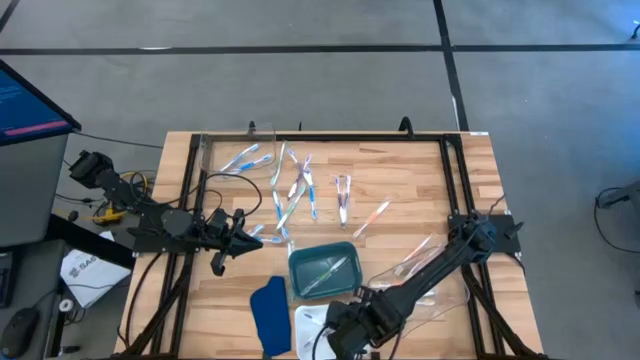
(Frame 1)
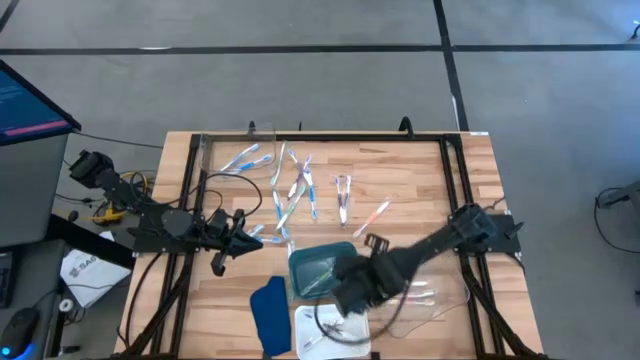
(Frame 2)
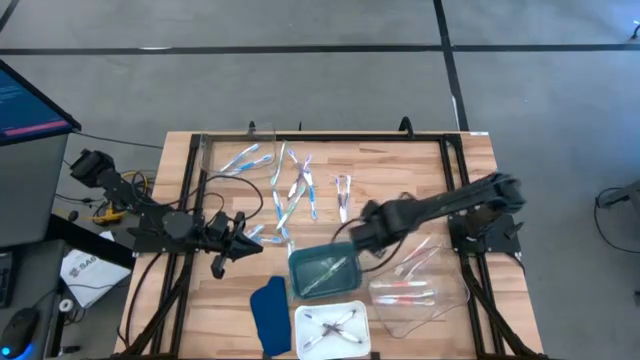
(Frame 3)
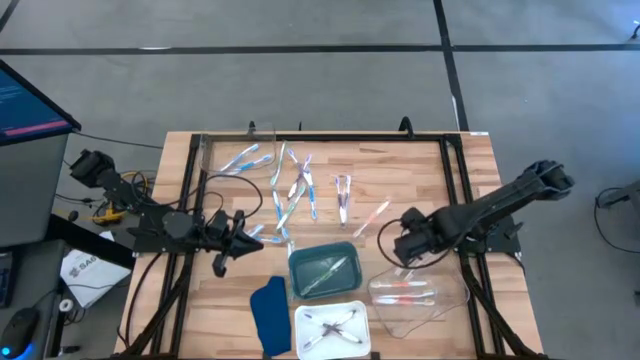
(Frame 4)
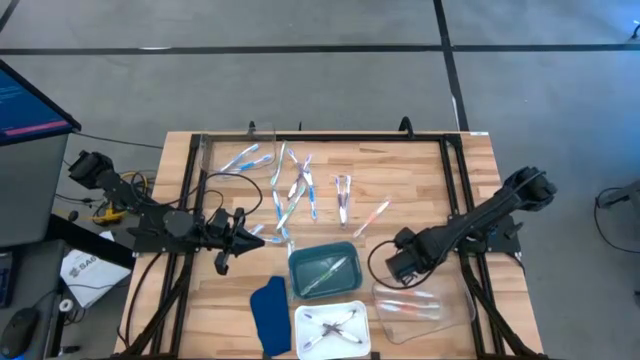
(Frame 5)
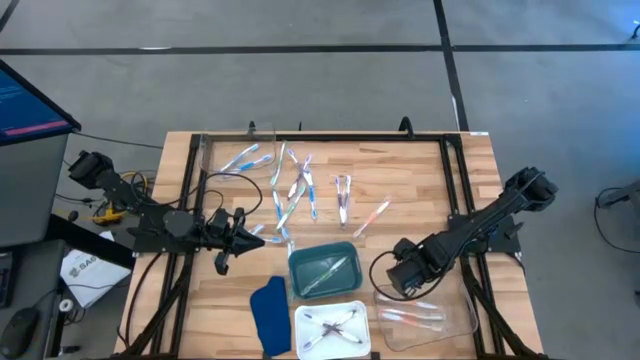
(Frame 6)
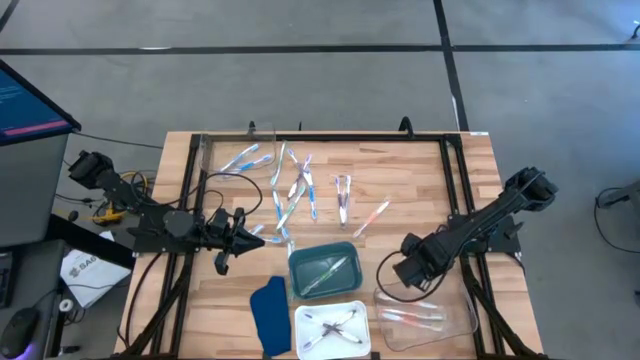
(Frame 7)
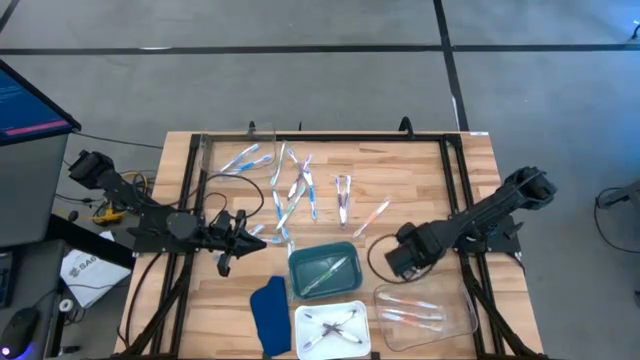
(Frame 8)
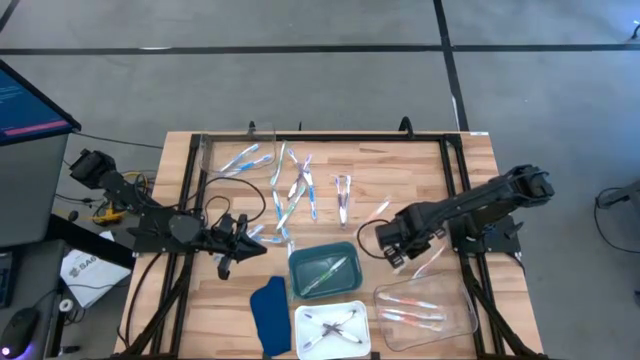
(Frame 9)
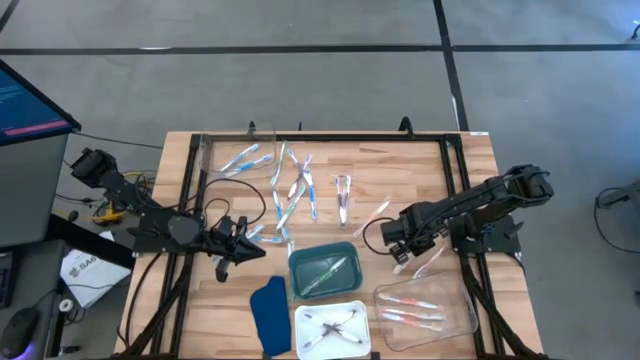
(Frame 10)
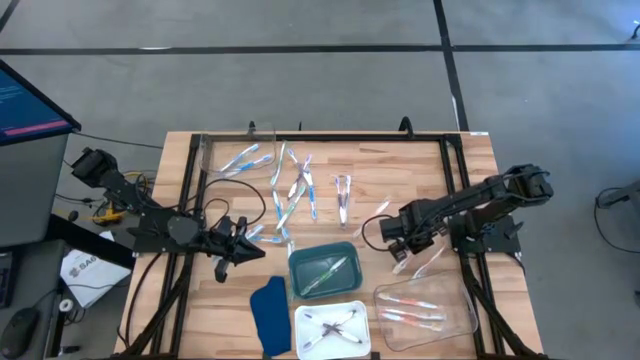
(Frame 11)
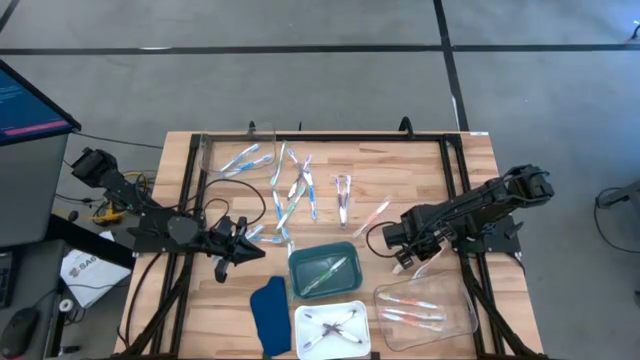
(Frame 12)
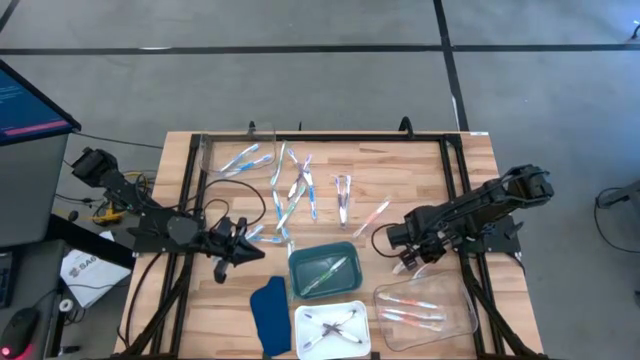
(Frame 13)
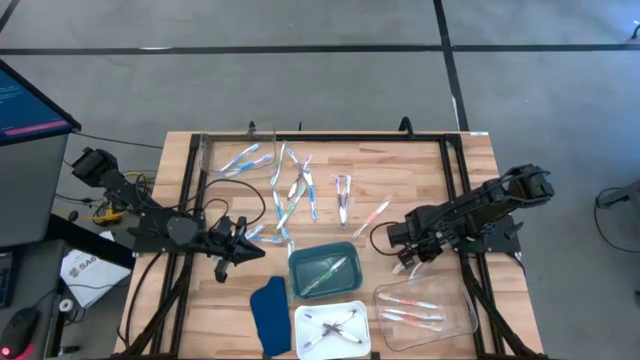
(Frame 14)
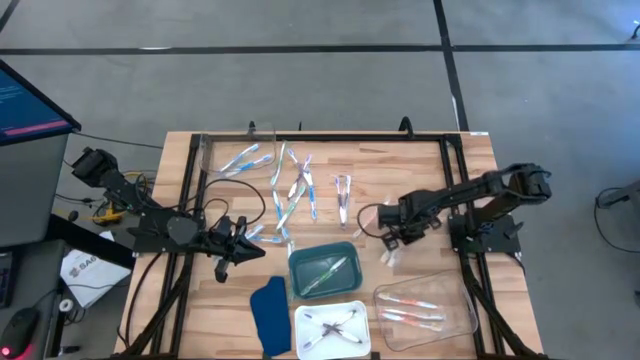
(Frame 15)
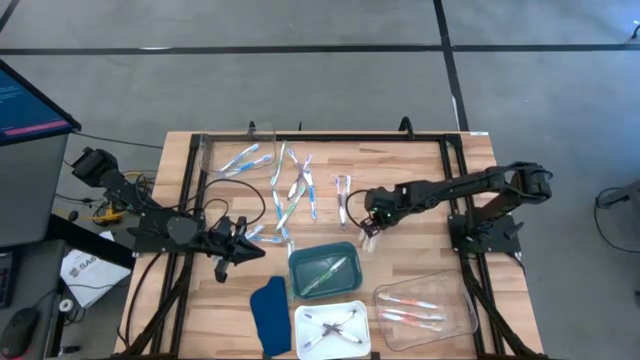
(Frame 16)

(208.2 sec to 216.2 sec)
Task: Pick & Place Toothbrushes
Adjust the orange toothbrushes

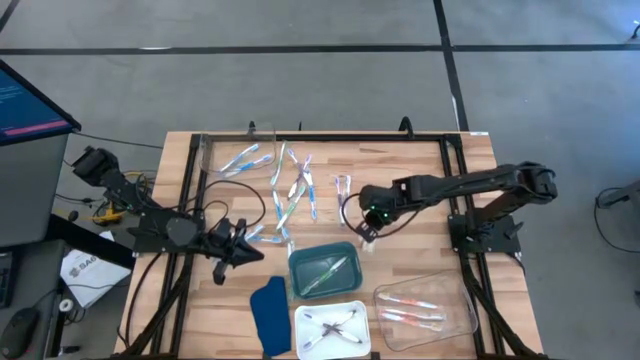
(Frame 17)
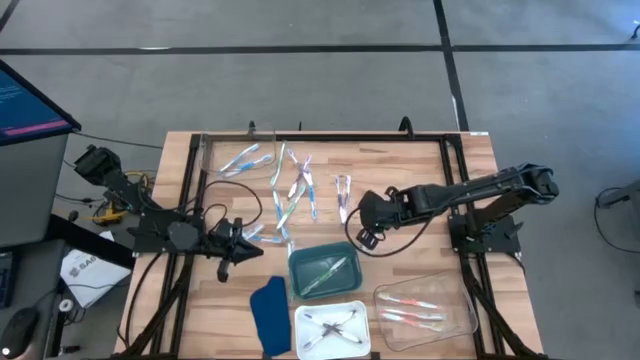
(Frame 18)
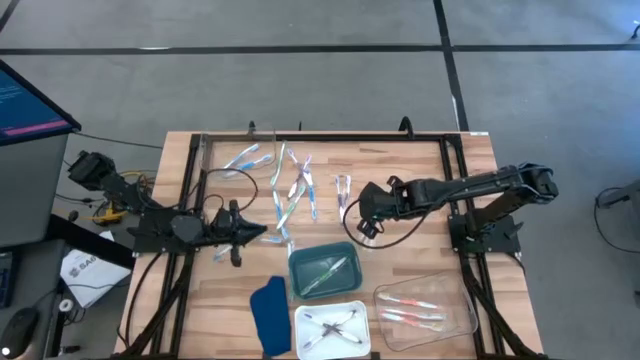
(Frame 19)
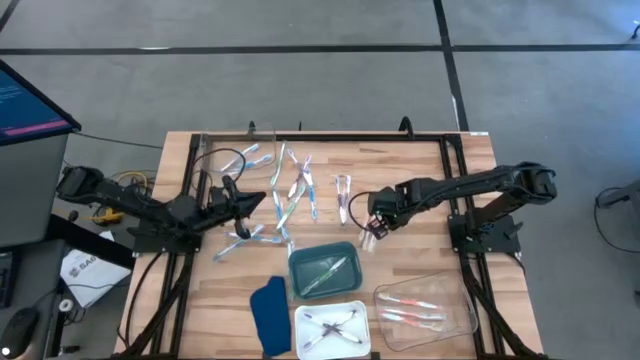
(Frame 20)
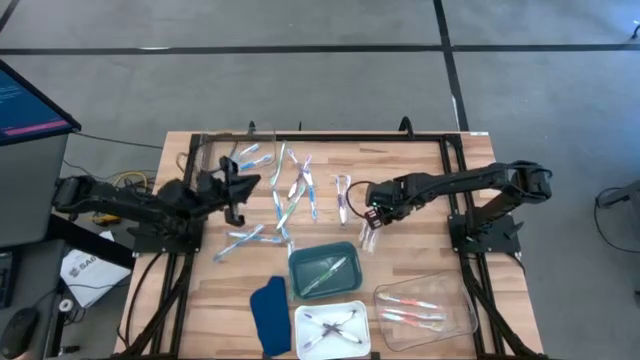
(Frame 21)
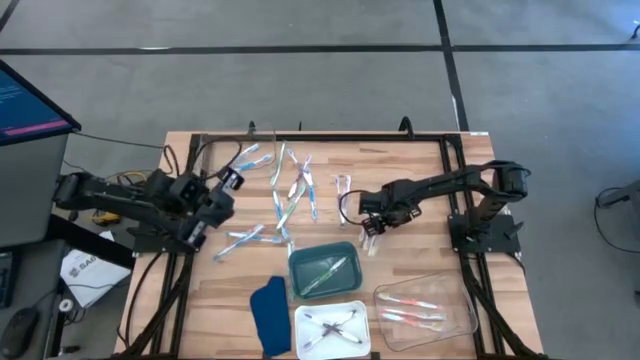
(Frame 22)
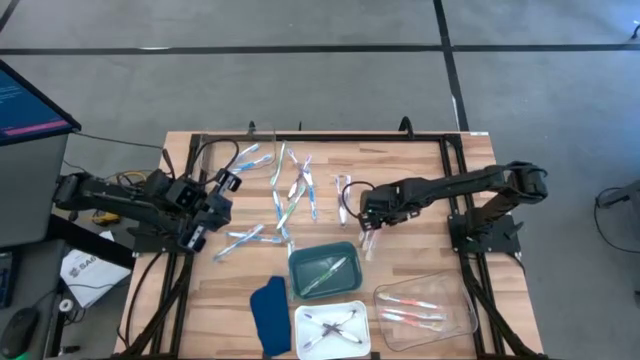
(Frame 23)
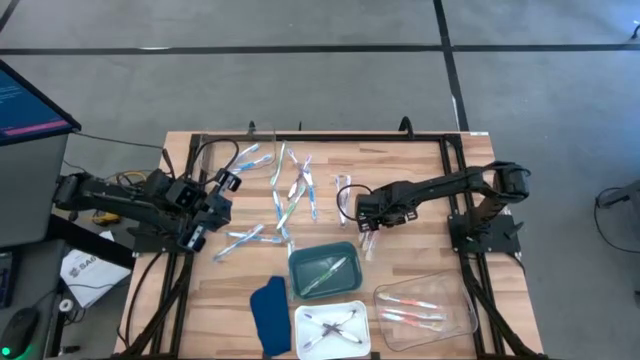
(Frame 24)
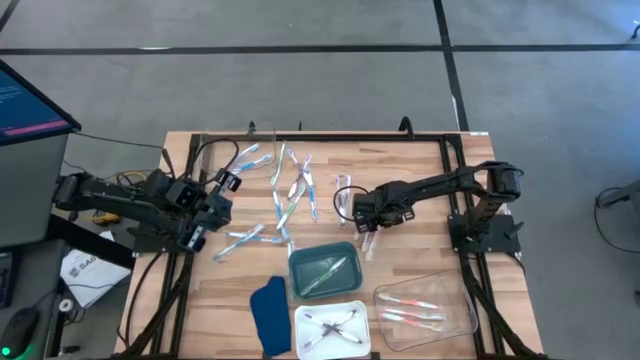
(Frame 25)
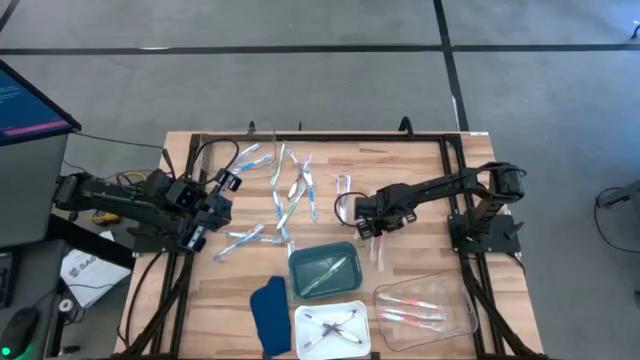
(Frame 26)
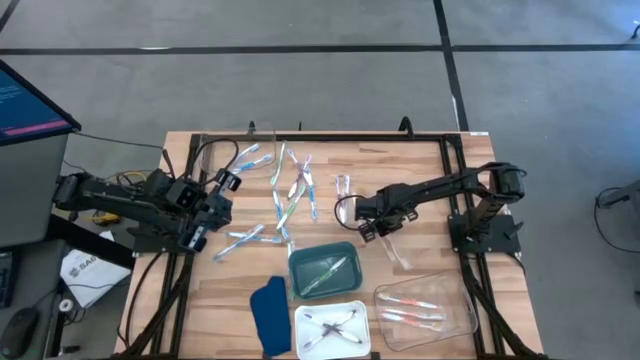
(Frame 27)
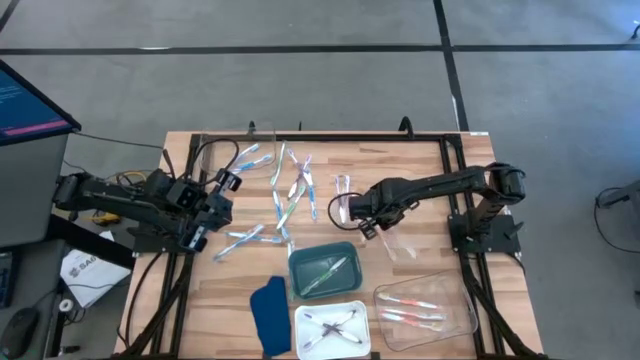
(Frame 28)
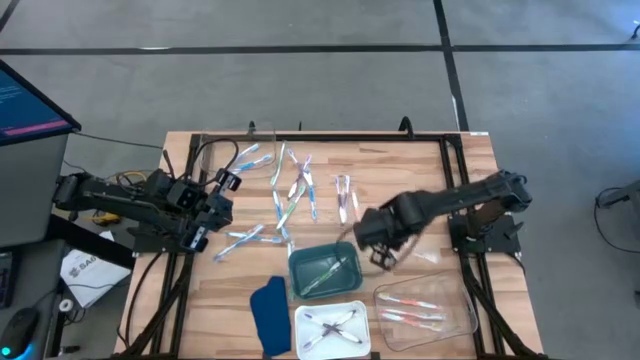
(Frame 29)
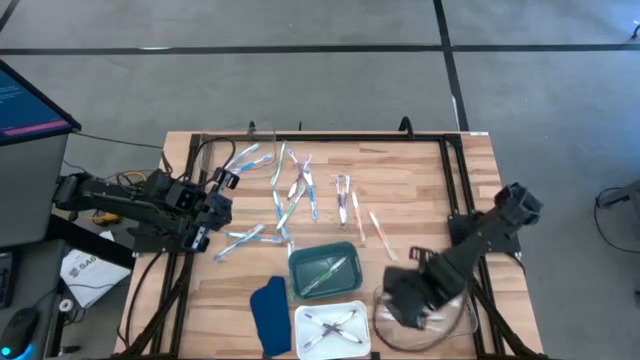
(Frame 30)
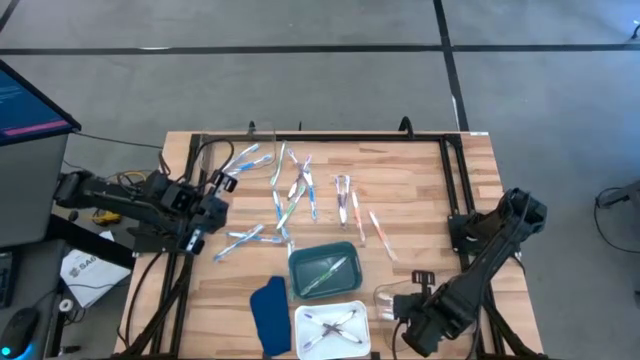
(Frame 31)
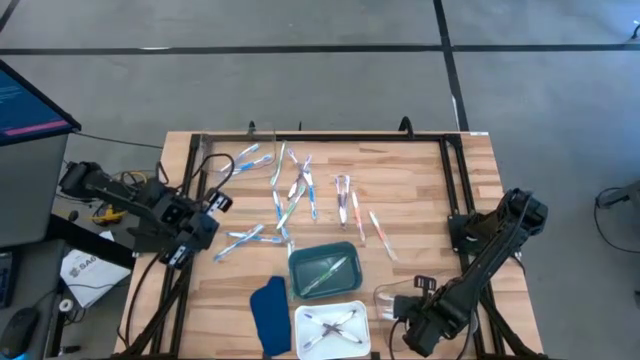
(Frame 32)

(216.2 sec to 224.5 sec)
Put the orange toothbrush into the bottom transparent bin

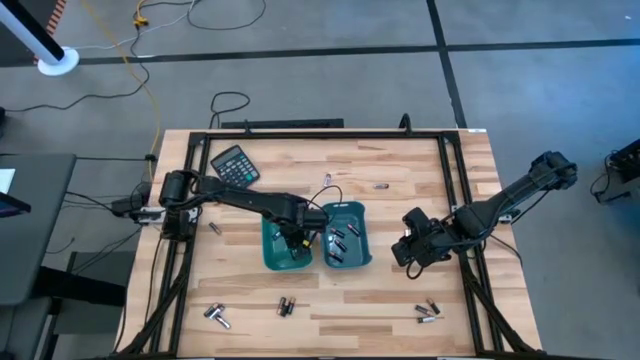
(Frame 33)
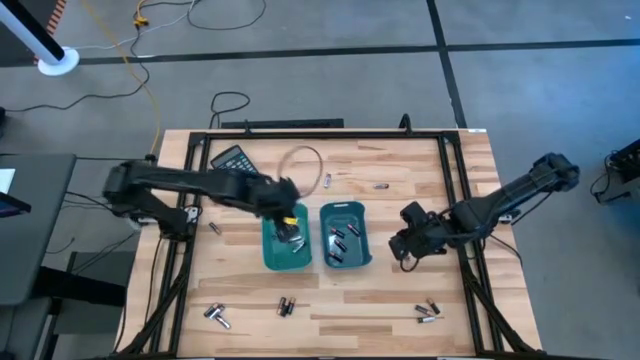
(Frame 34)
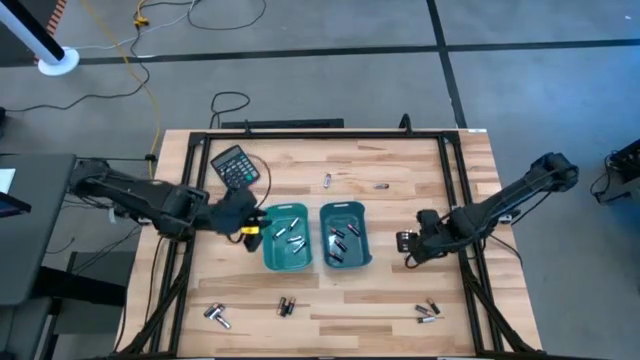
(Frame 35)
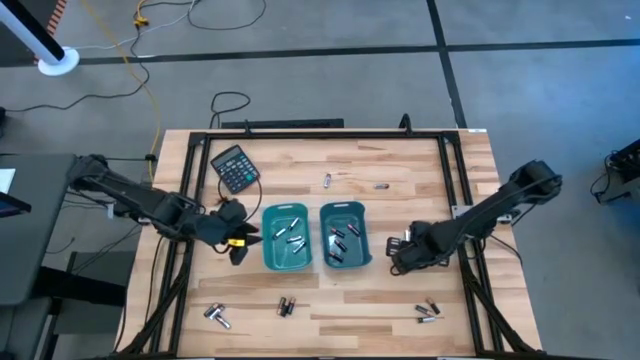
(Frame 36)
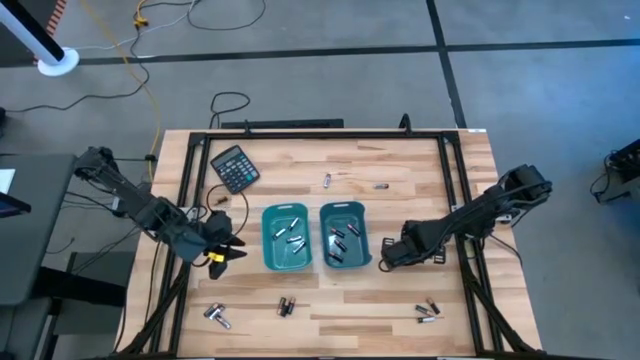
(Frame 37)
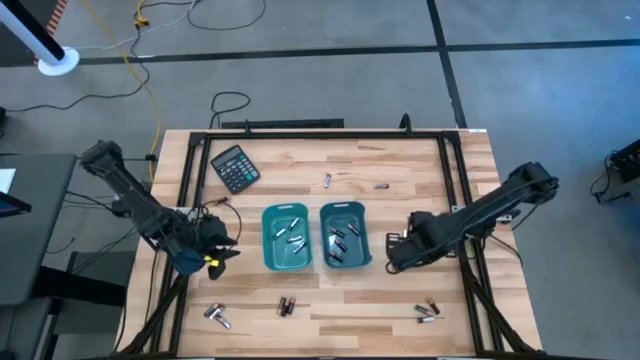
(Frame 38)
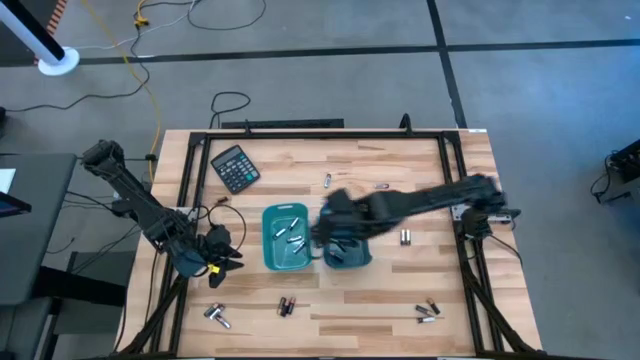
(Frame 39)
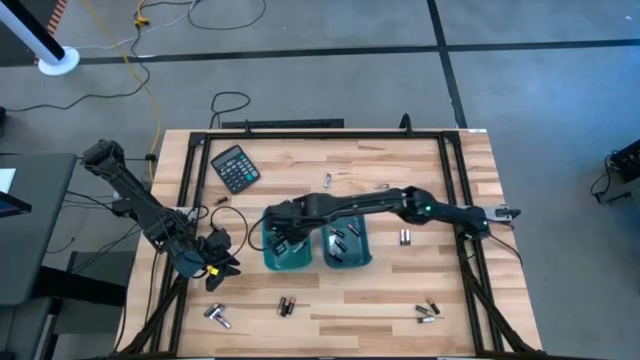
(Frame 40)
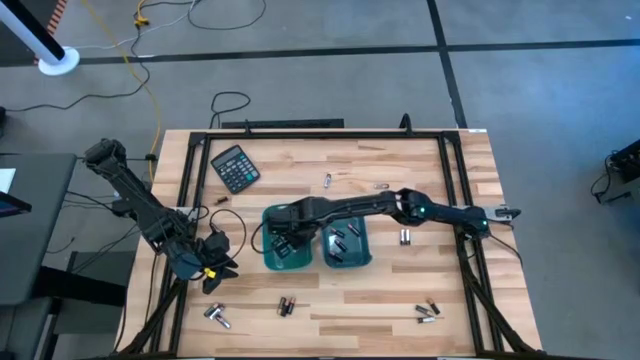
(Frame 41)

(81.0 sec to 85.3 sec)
Task: Sort batteries
Put the silver battery into the green bin
